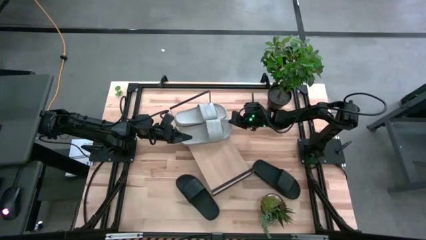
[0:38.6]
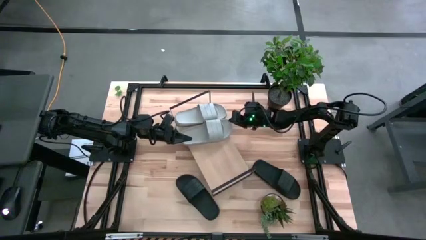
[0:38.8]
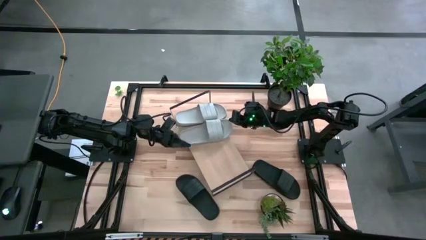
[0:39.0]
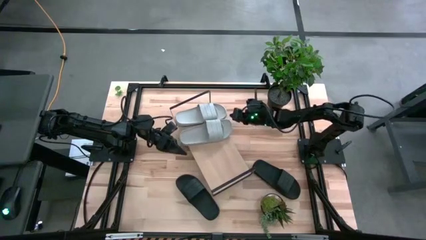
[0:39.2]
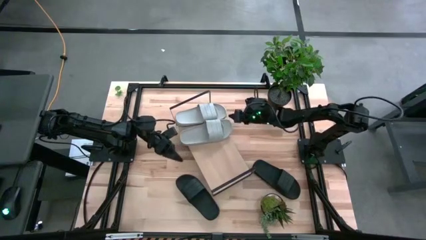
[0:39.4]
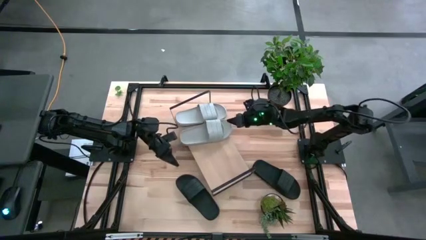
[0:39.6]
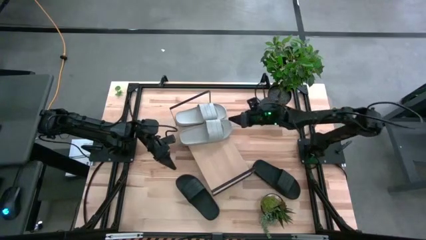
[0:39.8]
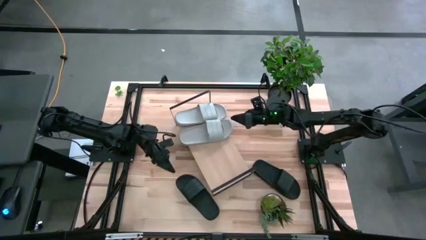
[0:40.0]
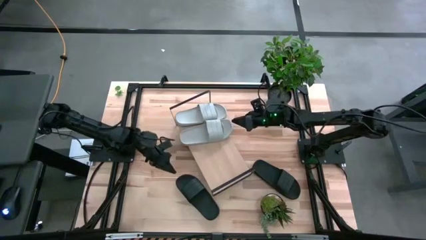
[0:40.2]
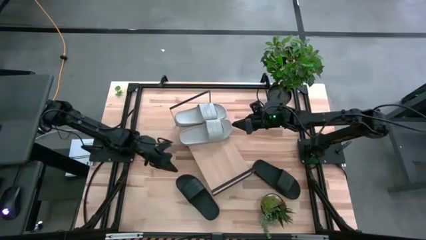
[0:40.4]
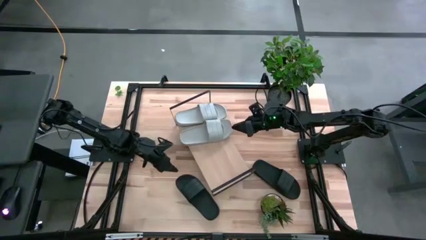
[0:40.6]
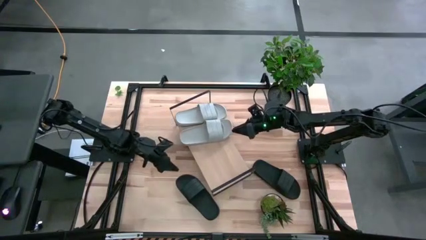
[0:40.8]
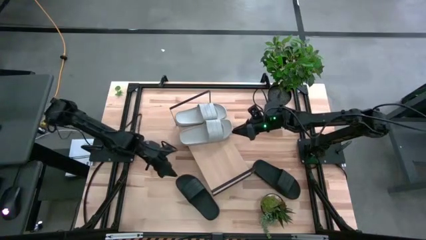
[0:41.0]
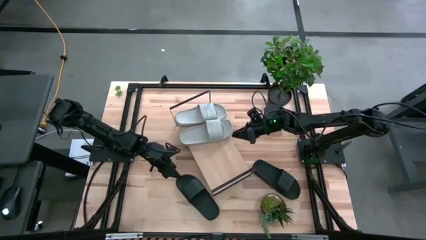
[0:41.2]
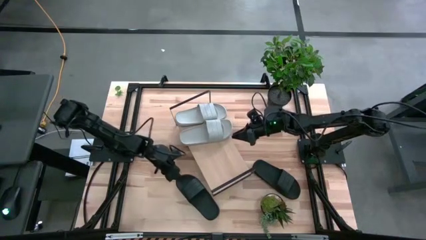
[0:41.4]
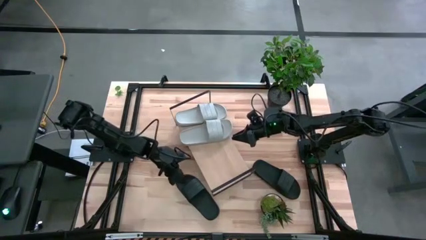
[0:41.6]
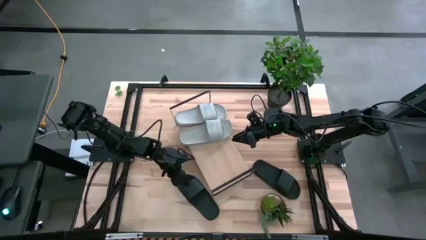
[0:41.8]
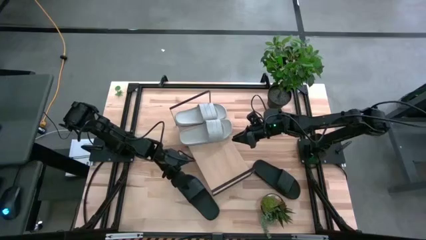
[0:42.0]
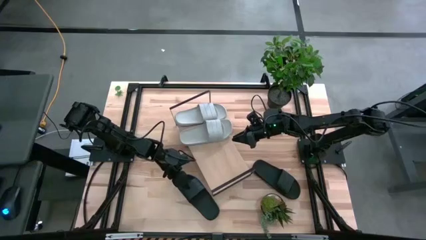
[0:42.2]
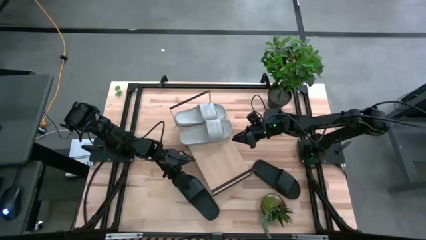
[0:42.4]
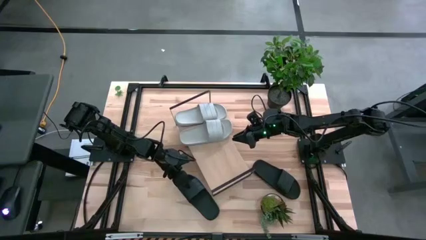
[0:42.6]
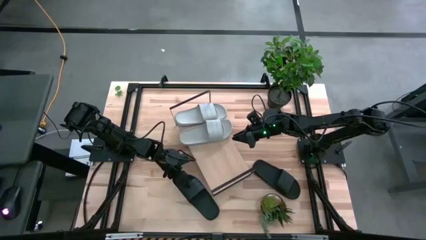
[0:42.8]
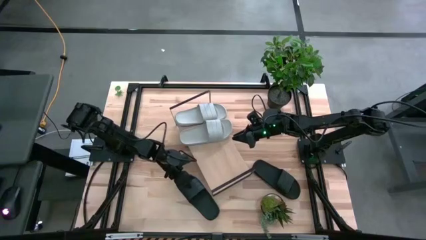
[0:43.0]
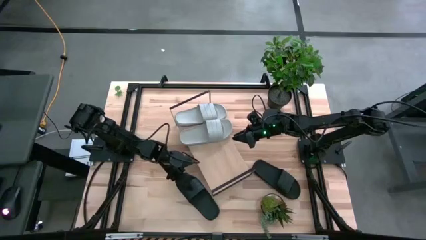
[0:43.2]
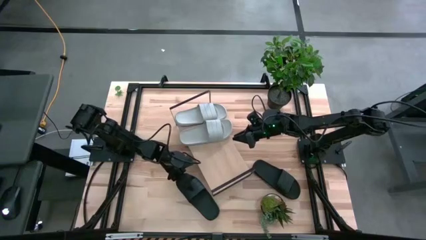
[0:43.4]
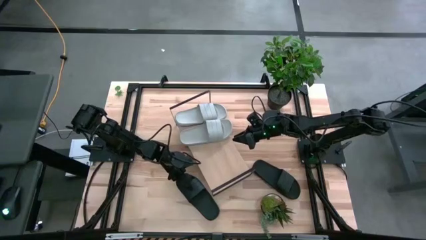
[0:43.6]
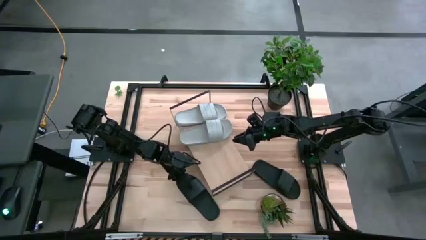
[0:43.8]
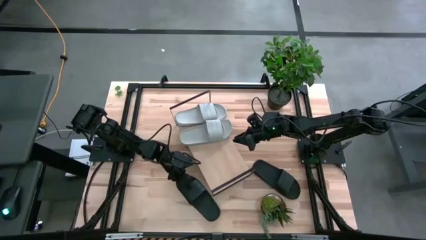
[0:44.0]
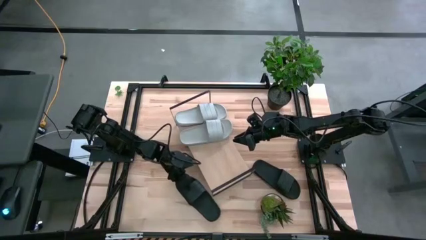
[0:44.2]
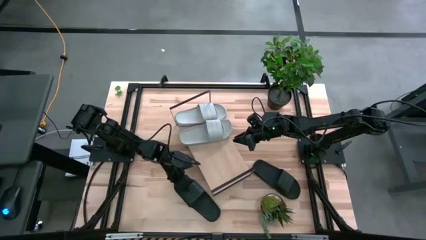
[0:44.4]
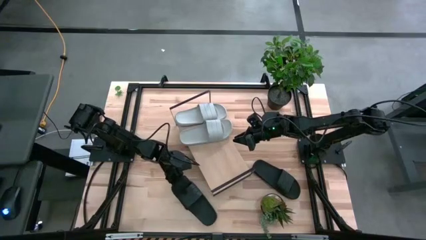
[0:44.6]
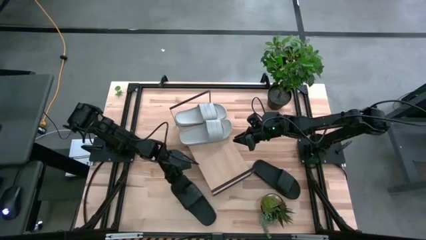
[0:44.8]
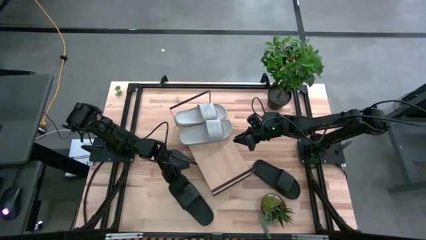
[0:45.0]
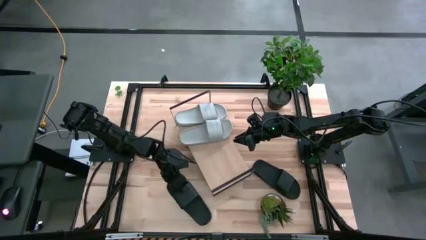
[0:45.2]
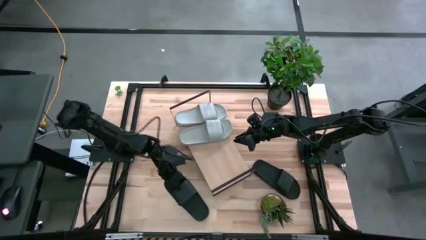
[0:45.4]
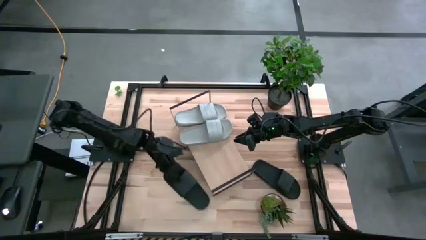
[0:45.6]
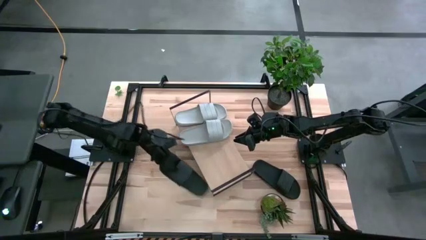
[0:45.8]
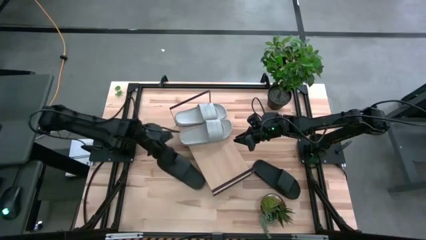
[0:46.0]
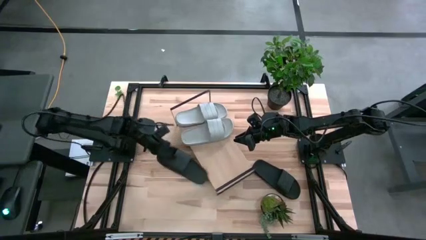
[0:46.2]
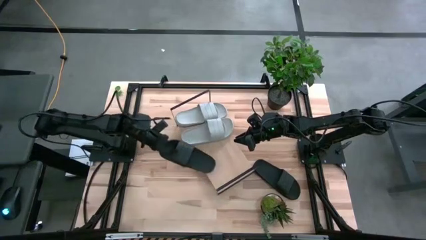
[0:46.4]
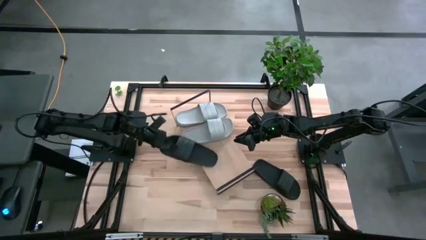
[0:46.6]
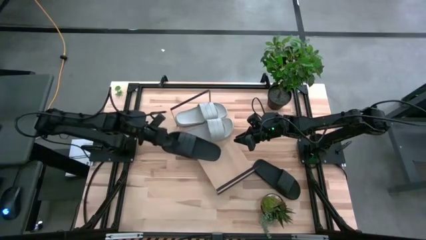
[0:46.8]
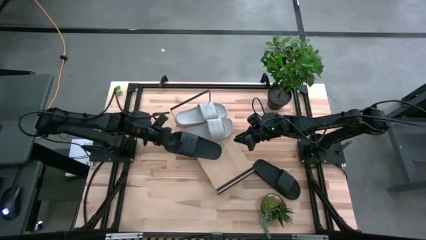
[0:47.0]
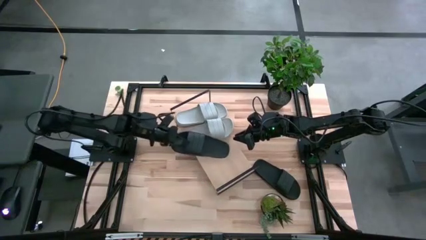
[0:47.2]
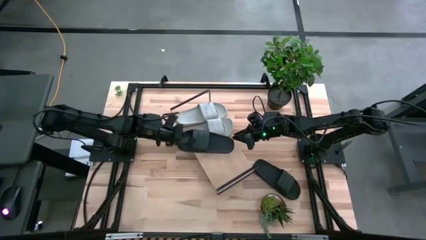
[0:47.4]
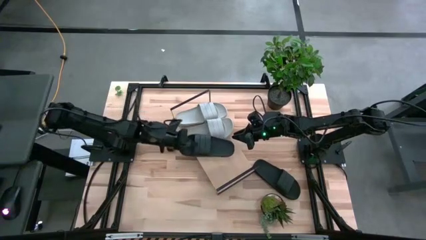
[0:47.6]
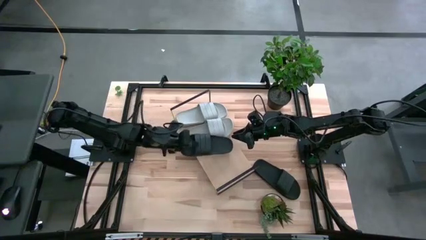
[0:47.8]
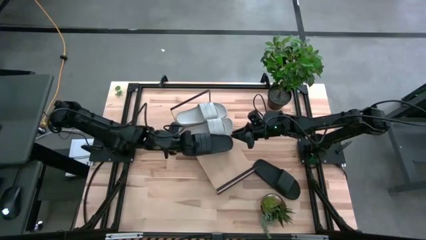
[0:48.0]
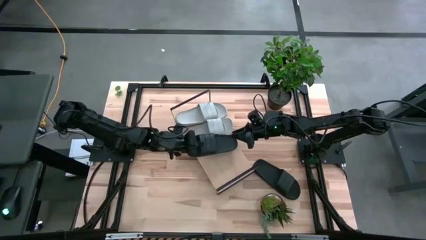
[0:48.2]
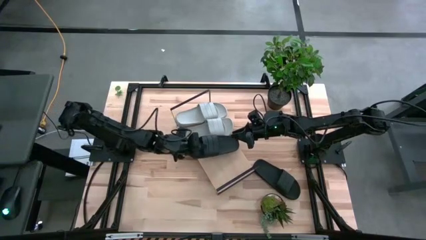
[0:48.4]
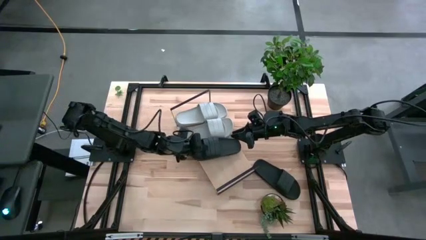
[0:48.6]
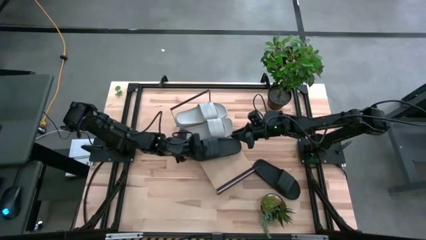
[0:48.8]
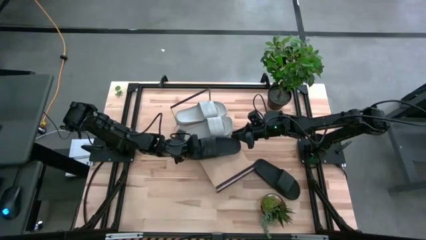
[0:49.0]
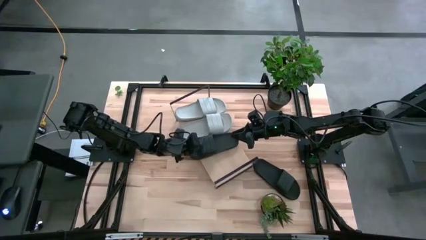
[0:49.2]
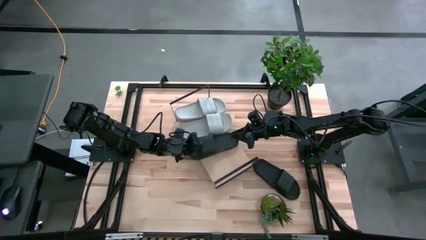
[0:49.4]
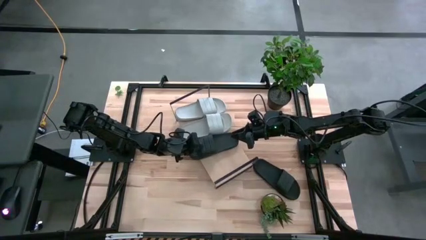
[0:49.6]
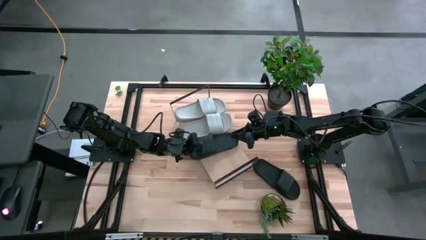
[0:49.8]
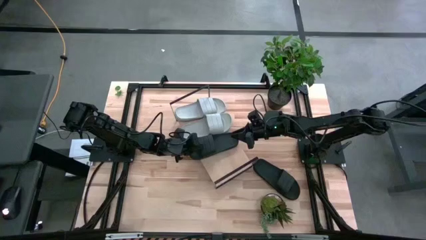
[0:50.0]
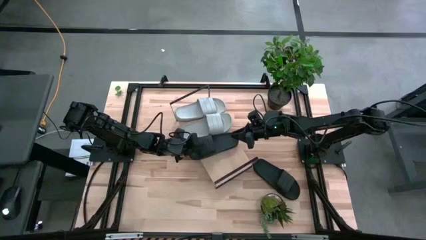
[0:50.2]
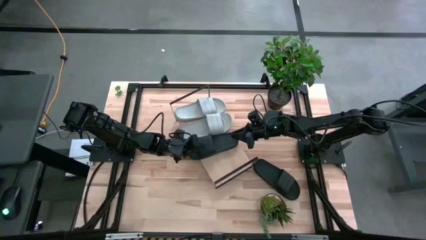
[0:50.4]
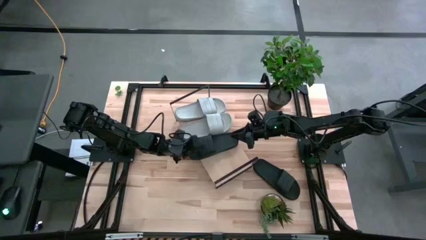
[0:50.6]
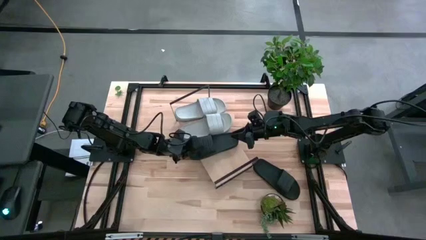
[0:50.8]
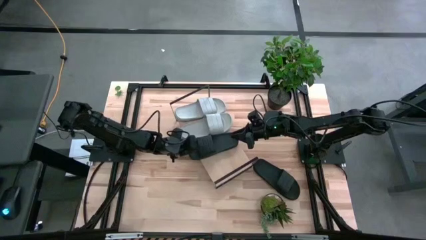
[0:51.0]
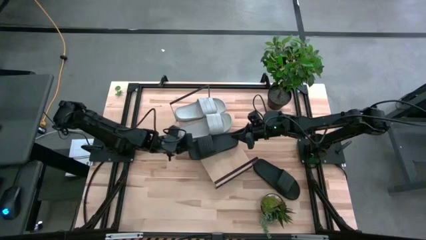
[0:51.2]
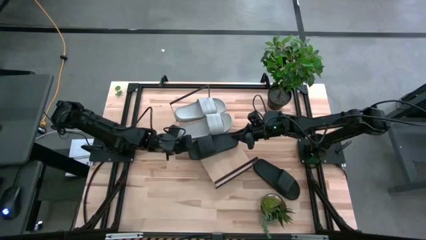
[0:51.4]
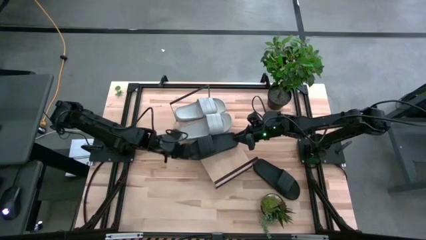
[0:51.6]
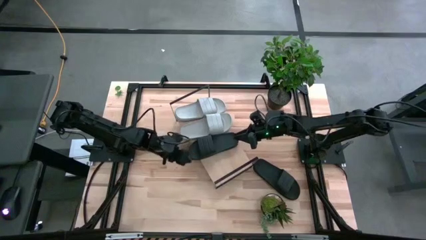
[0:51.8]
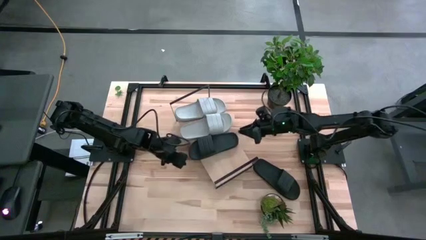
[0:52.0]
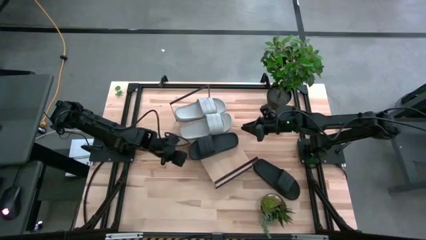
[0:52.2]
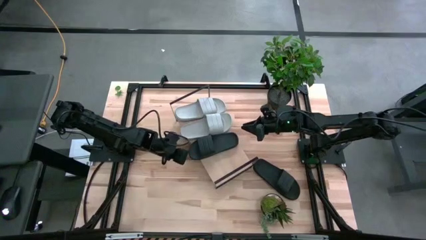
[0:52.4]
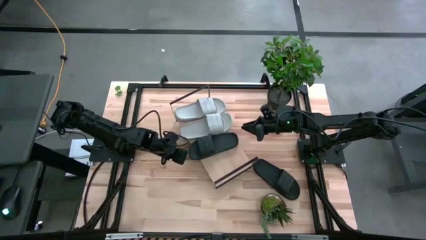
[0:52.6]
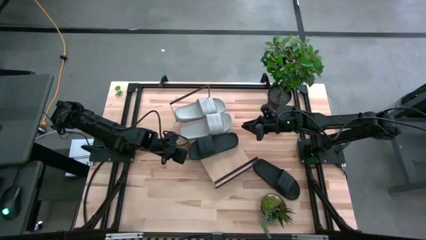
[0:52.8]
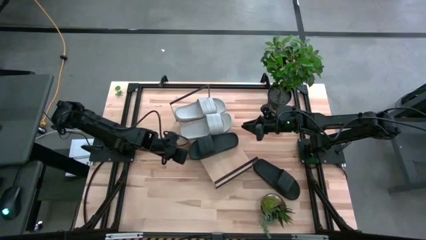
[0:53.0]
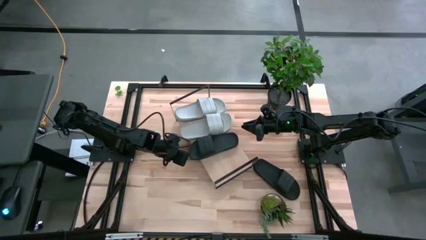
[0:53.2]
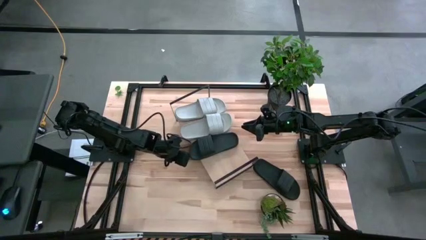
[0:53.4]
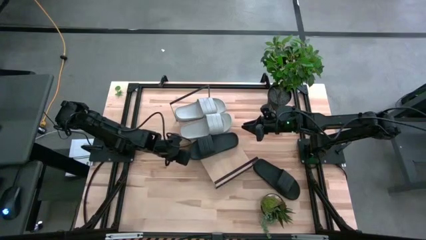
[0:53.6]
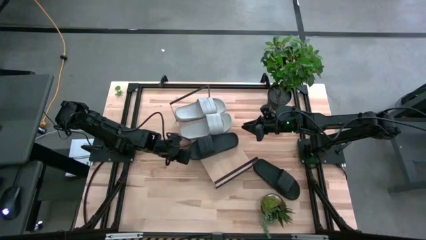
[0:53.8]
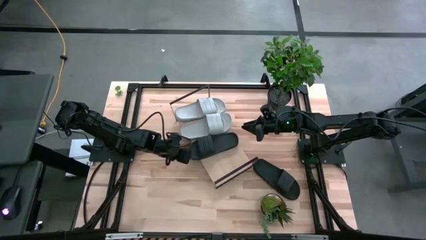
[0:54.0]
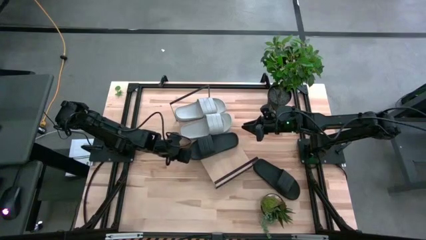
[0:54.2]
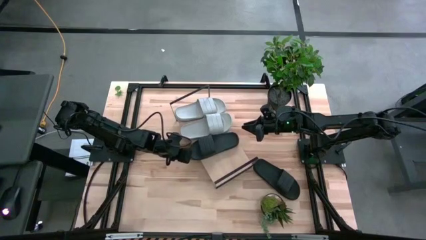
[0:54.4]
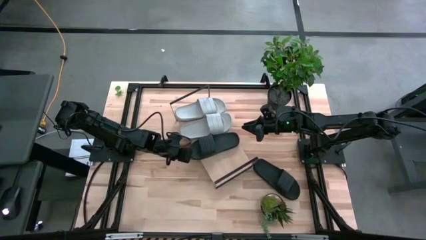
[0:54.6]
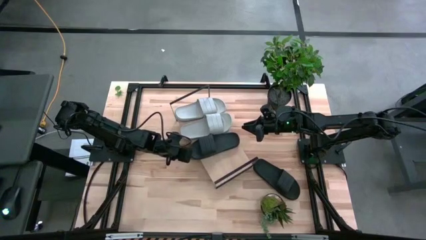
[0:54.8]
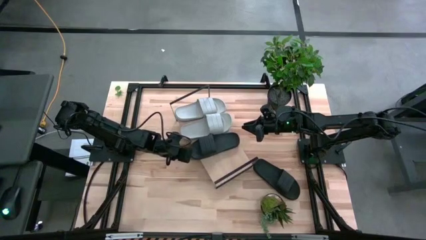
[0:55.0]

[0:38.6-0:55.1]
Task: Pick and place slides into the shelf
Put the left black slipper on the shelf
